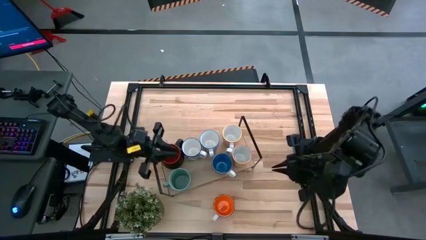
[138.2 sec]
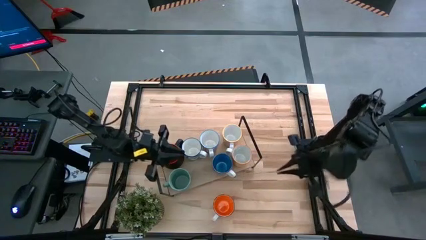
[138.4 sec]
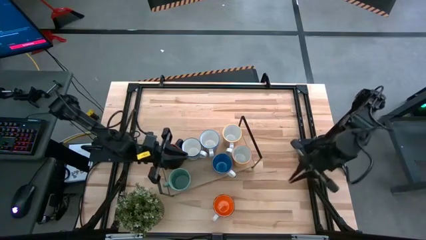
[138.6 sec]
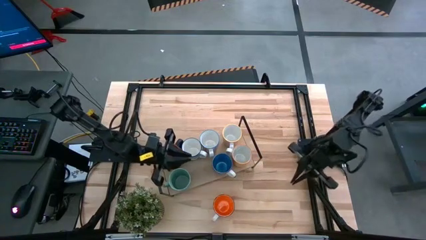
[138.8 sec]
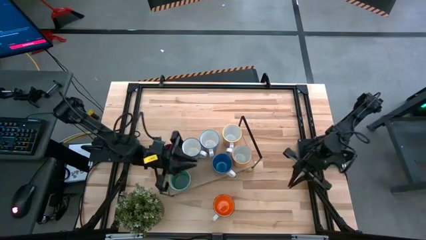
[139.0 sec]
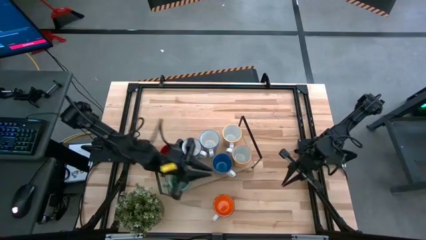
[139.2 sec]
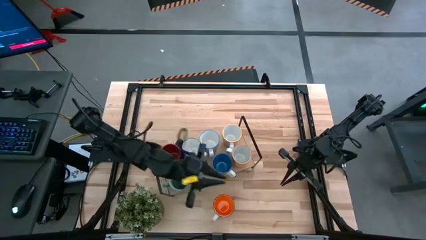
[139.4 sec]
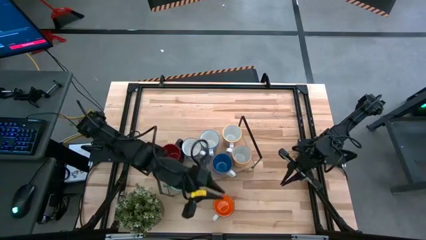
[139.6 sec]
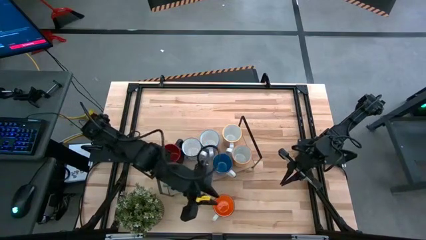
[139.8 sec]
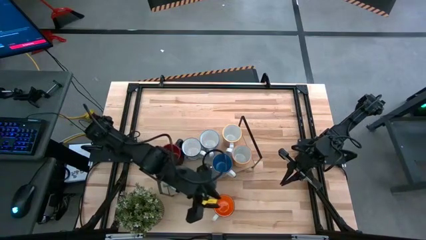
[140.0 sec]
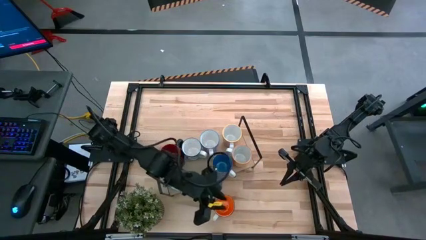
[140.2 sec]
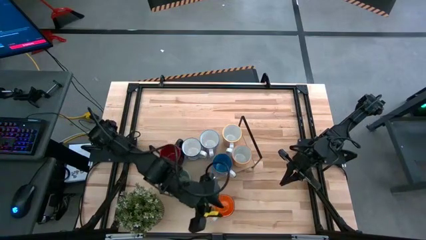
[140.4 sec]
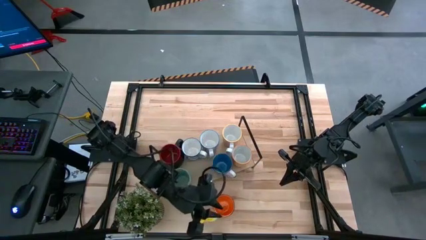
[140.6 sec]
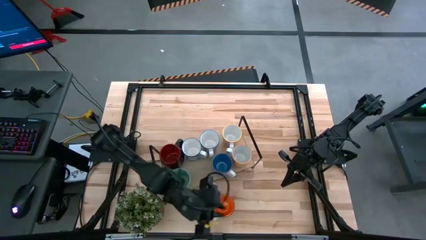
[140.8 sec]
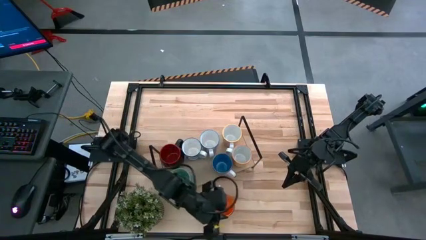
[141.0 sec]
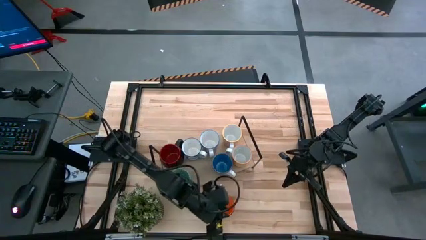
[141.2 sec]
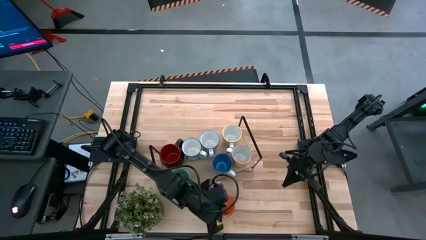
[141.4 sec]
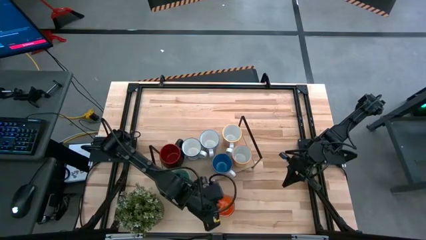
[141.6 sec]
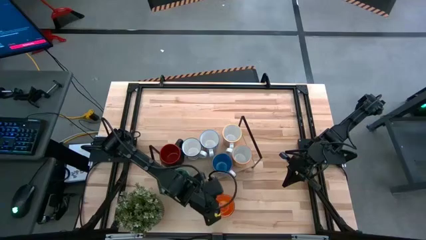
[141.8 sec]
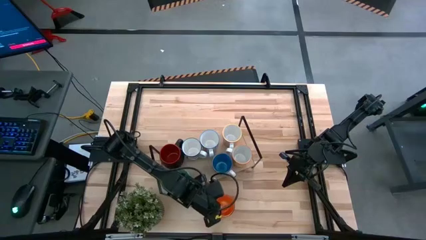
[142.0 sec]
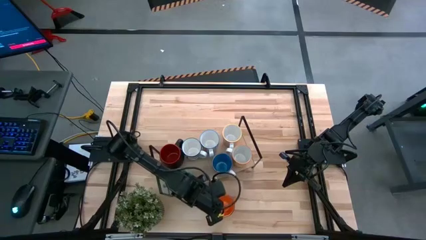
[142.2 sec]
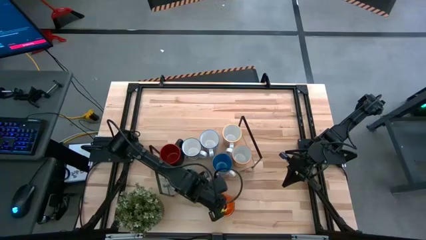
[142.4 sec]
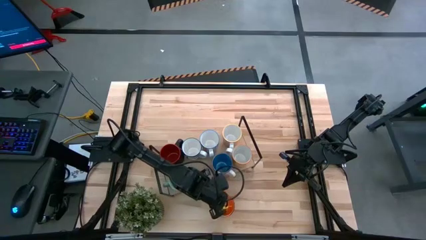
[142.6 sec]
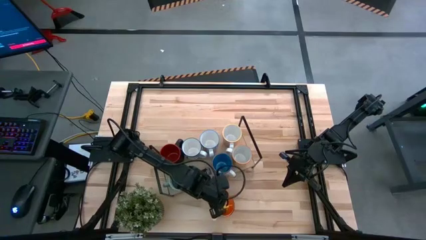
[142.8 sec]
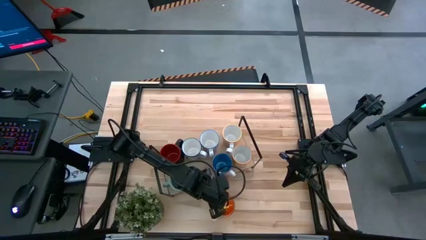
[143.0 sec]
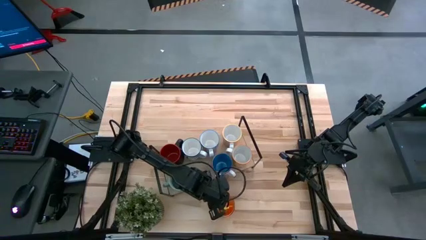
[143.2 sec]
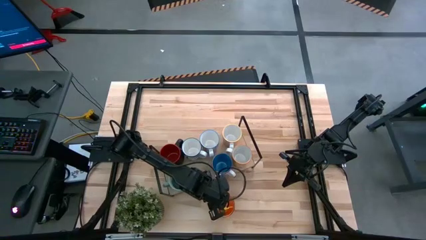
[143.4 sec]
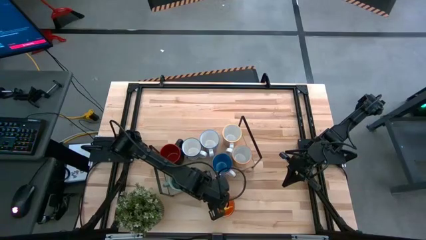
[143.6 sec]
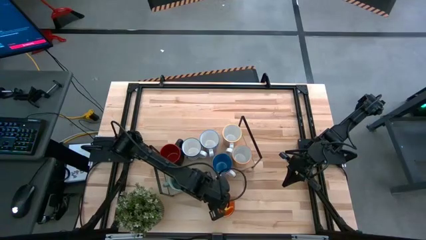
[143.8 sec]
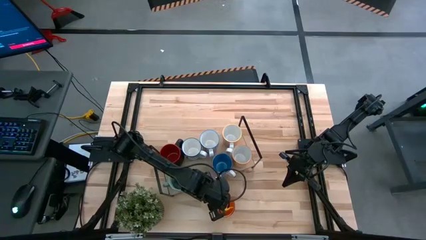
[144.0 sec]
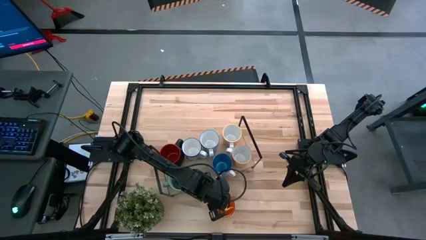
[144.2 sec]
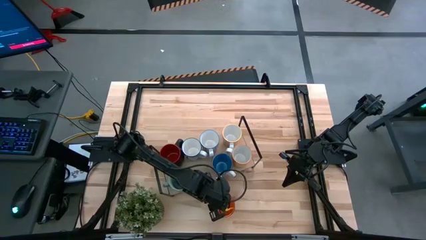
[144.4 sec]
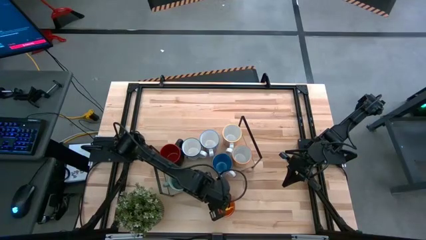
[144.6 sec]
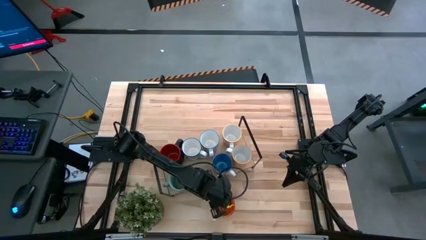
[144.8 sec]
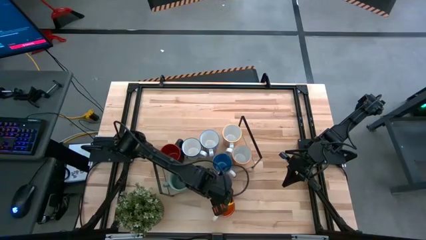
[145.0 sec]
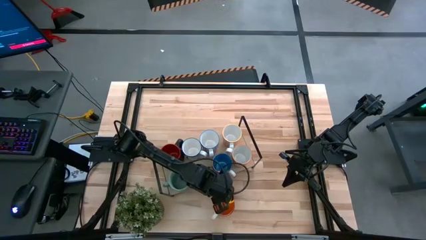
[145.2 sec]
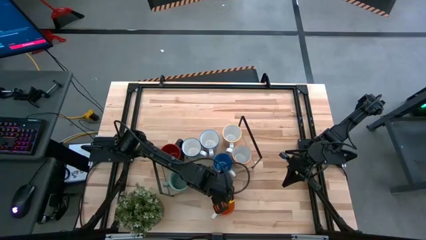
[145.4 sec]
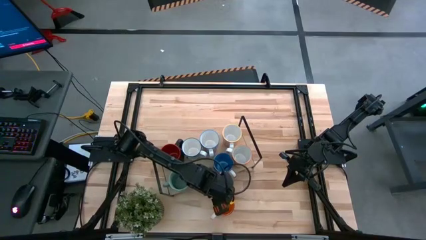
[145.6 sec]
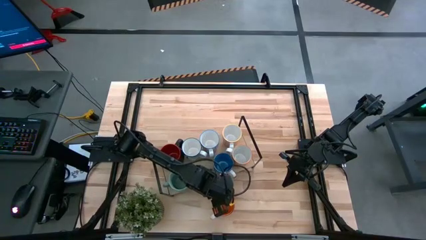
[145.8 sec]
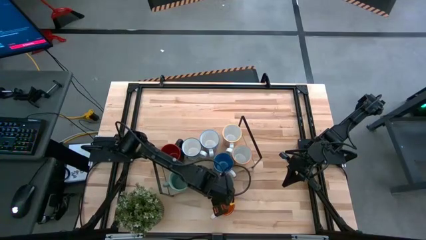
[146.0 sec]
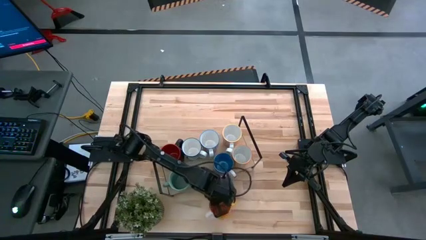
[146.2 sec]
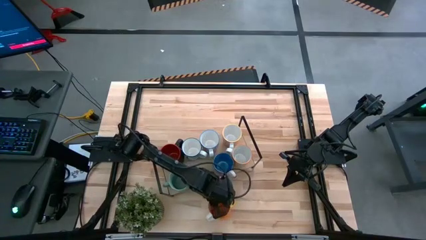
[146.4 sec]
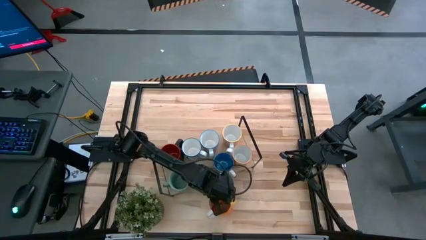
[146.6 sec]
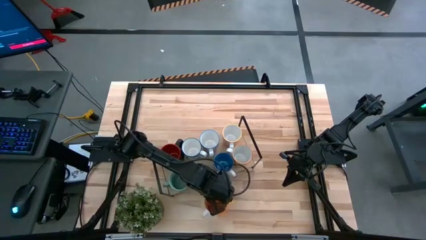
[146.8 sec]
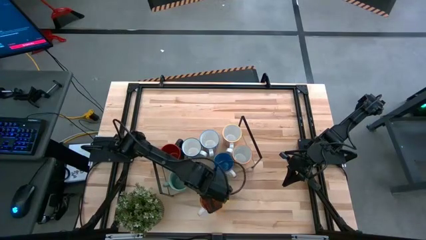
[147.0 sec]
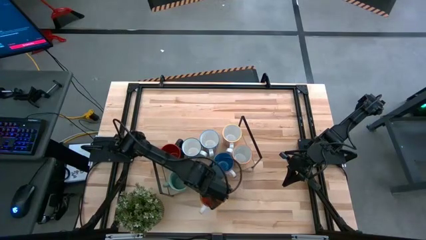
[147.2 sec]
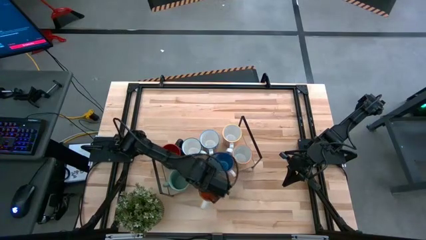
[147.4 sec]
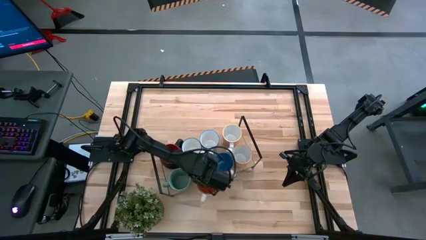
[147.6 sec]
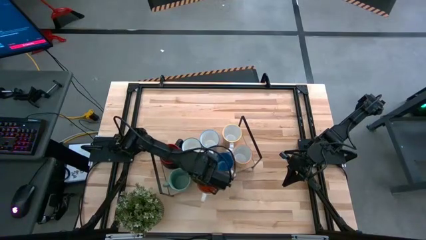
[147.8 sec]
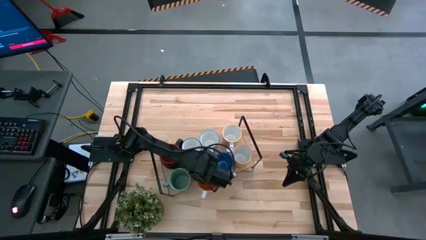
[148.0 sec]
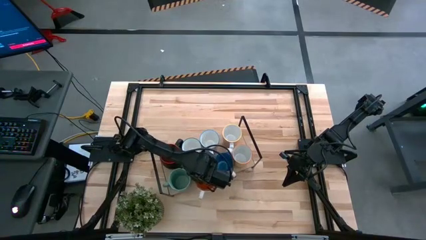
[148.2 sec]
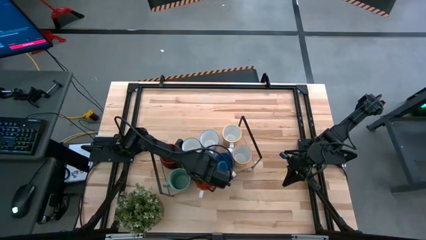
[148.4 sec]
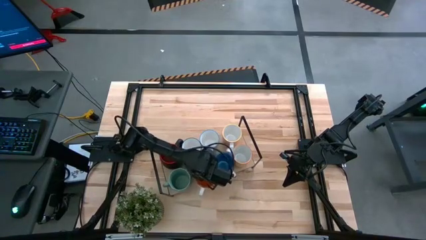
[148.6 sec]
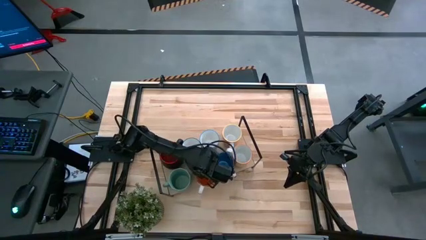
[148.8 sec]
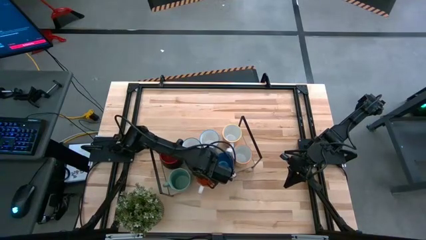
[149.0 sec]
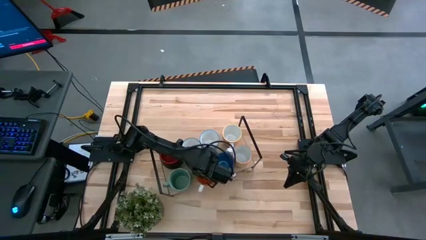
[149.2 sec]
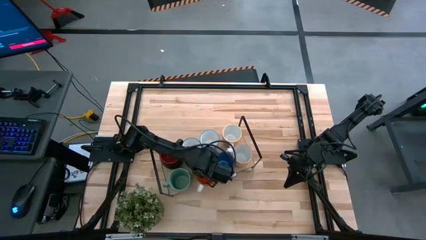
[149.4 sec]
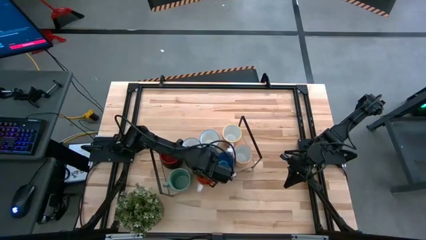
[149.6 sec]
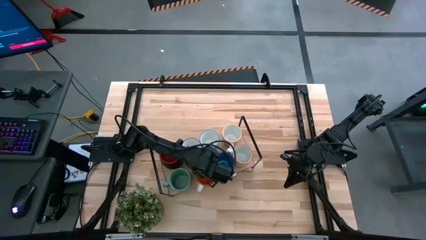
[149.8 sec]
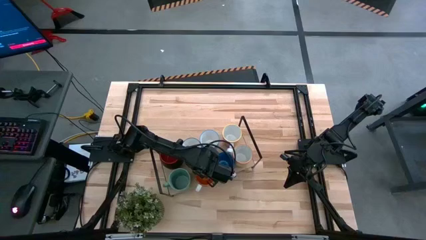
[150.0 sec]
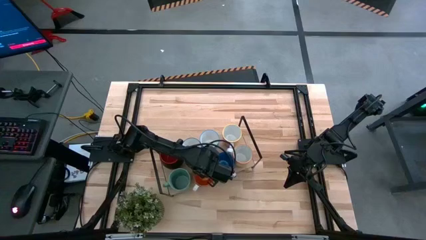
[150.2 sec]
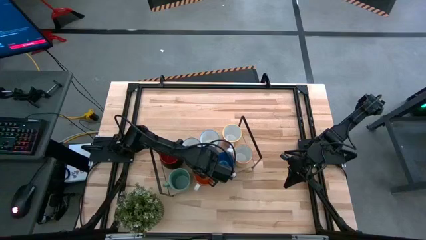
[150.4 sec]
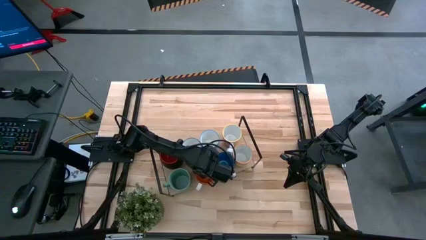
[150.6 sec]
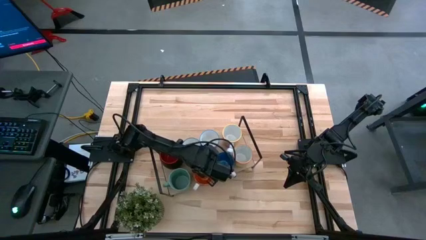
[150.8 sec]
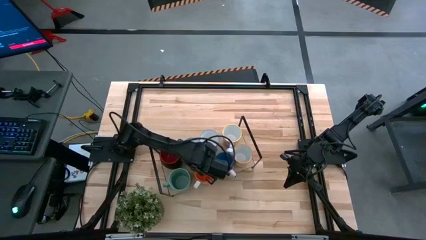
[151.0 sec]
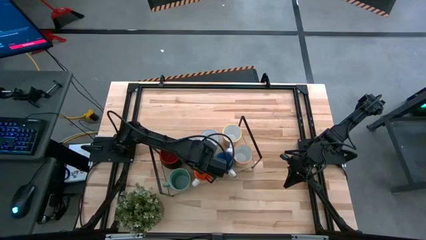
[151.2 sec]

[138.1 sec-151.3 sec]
Task: Place coffee mugs
Put the orange mug on the shelf
